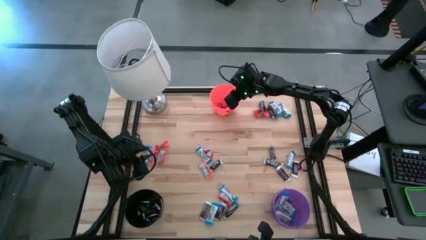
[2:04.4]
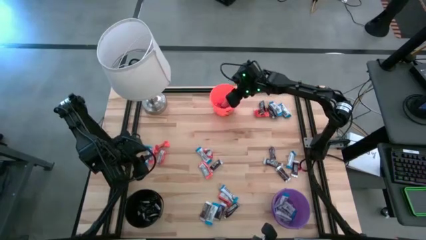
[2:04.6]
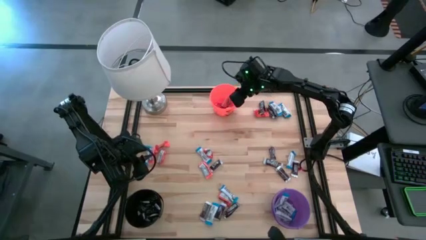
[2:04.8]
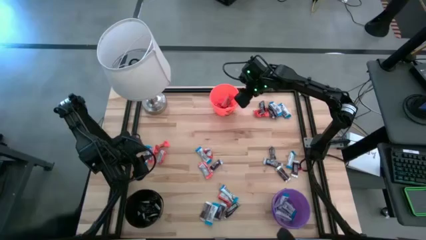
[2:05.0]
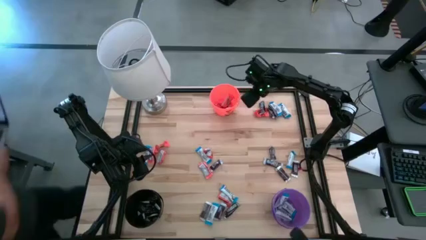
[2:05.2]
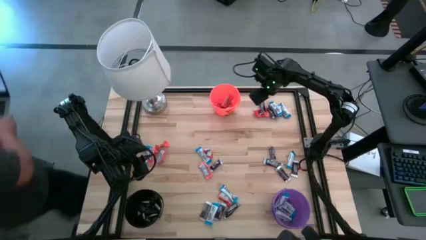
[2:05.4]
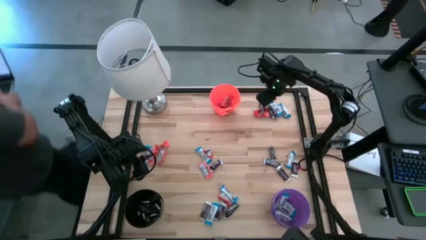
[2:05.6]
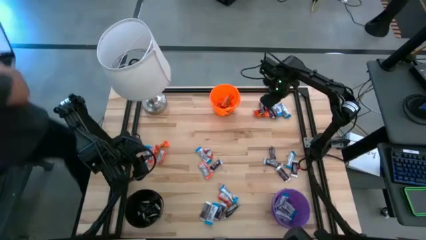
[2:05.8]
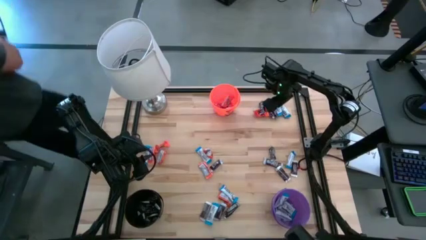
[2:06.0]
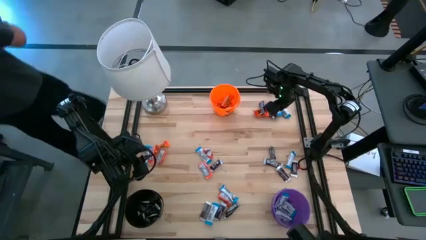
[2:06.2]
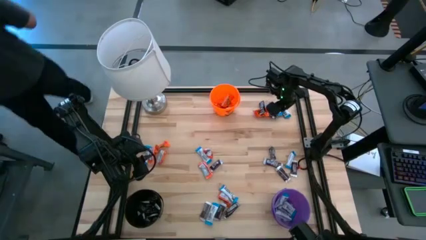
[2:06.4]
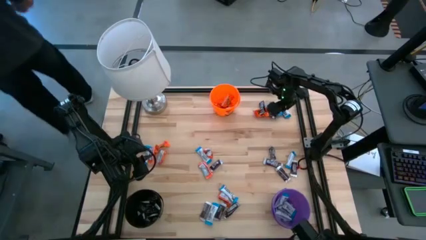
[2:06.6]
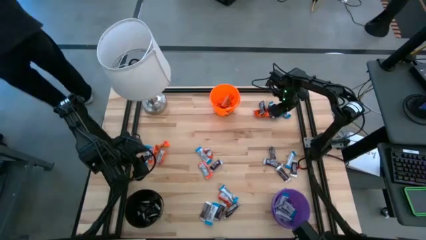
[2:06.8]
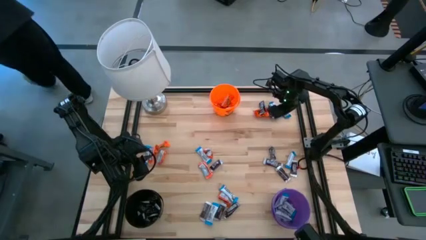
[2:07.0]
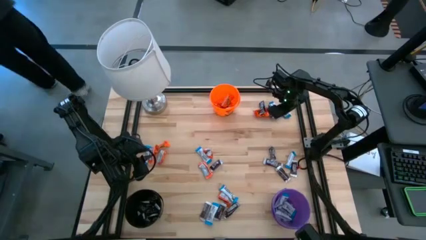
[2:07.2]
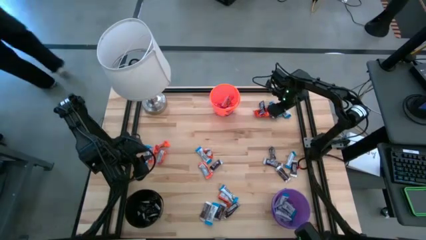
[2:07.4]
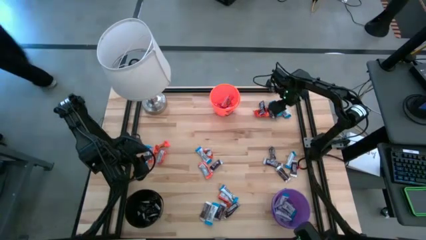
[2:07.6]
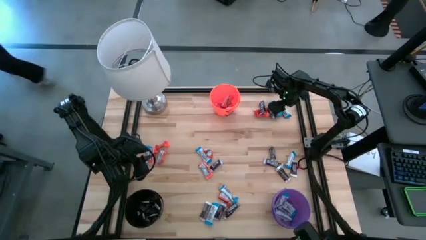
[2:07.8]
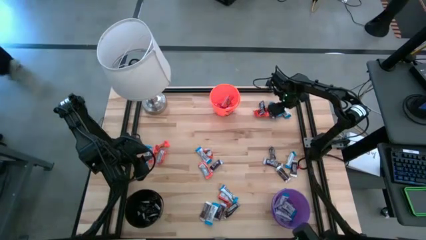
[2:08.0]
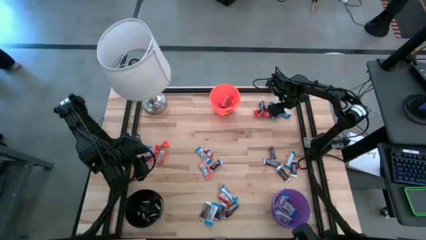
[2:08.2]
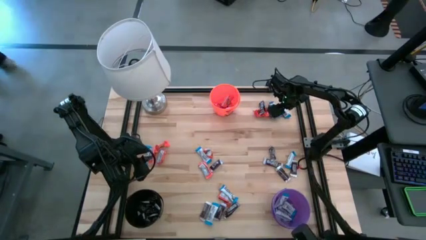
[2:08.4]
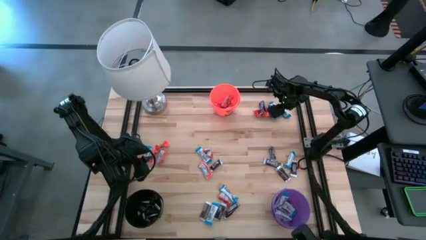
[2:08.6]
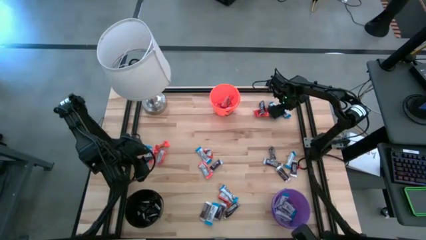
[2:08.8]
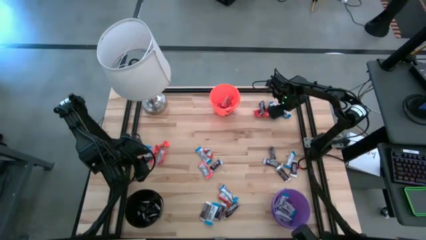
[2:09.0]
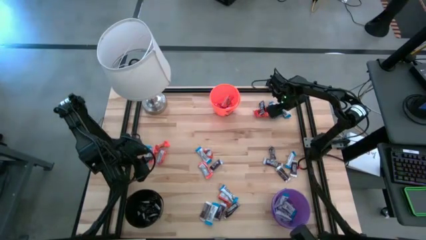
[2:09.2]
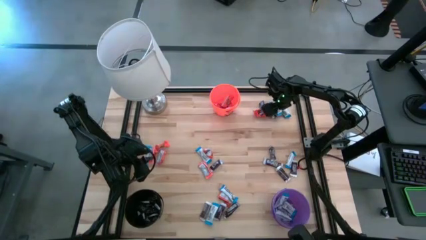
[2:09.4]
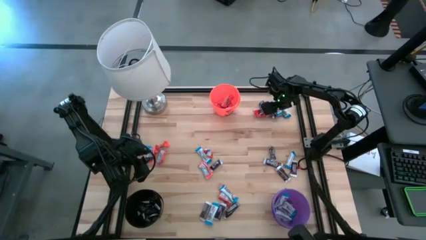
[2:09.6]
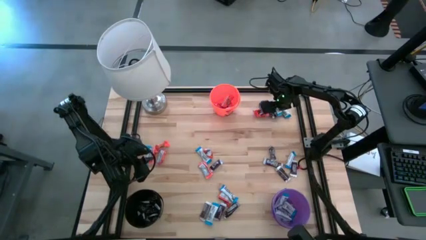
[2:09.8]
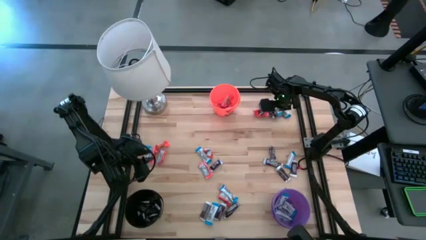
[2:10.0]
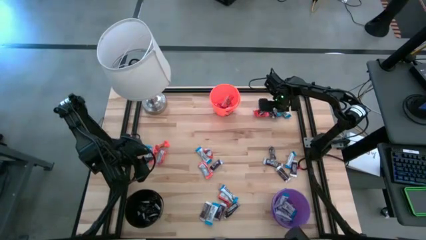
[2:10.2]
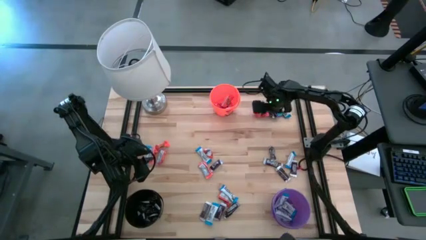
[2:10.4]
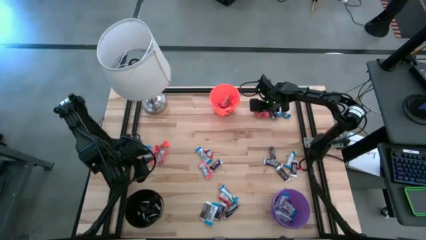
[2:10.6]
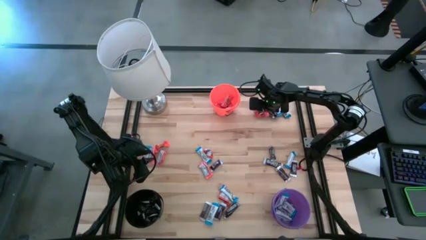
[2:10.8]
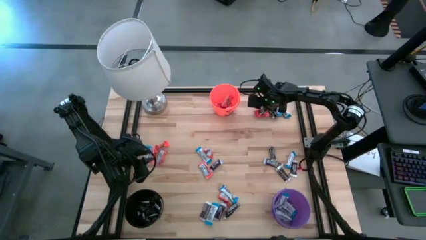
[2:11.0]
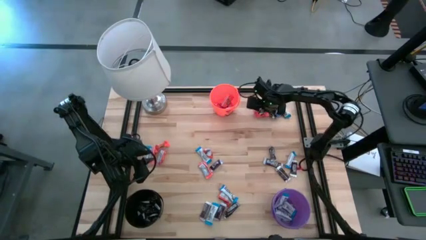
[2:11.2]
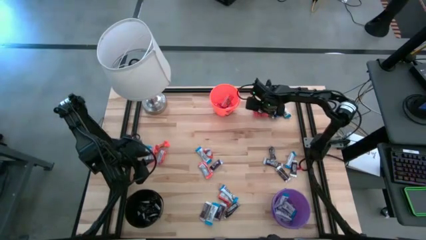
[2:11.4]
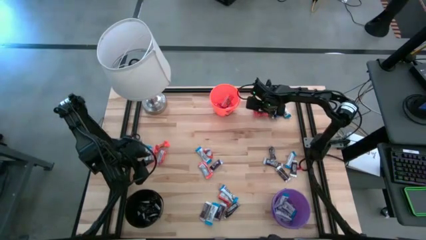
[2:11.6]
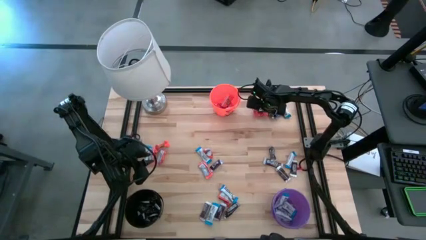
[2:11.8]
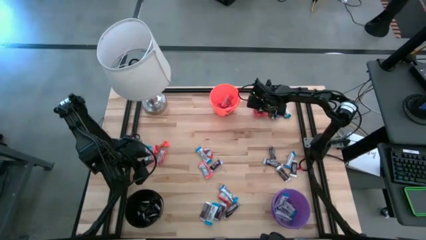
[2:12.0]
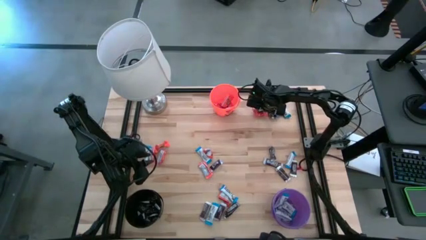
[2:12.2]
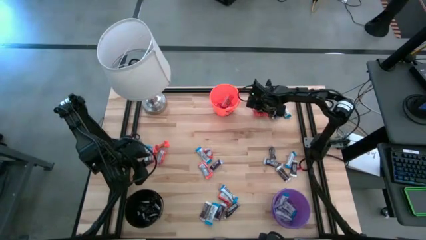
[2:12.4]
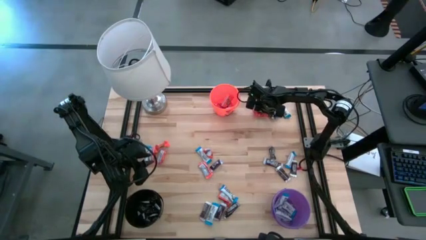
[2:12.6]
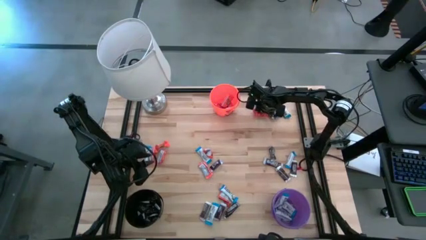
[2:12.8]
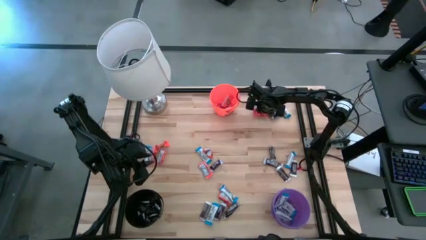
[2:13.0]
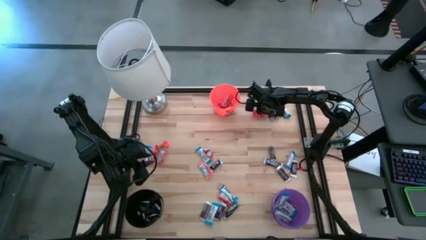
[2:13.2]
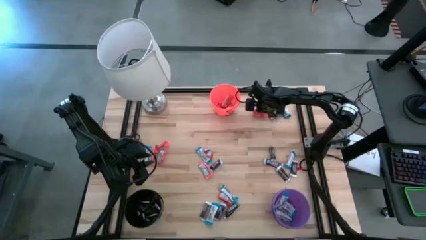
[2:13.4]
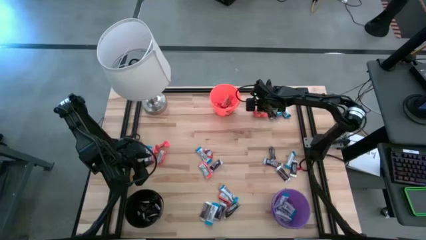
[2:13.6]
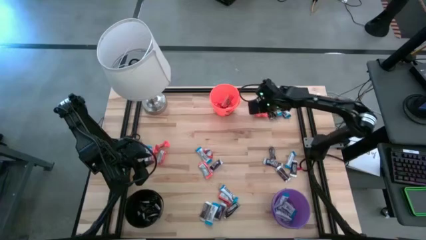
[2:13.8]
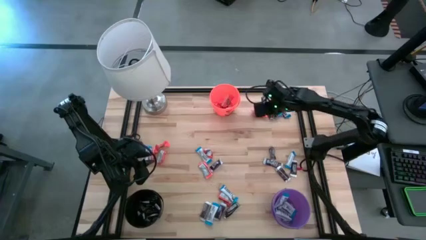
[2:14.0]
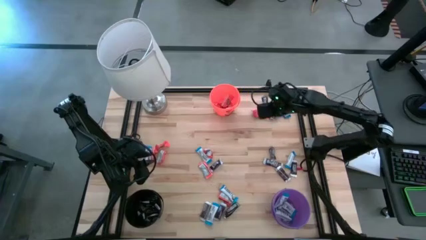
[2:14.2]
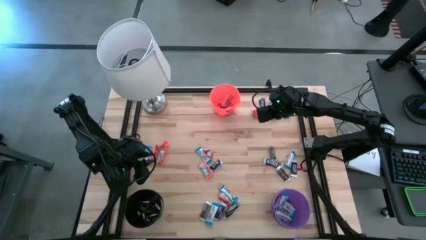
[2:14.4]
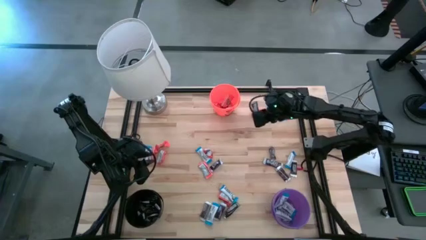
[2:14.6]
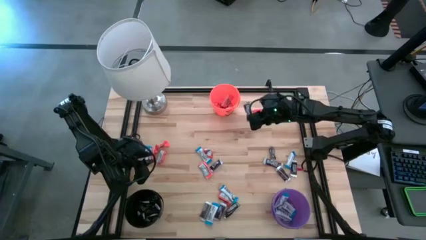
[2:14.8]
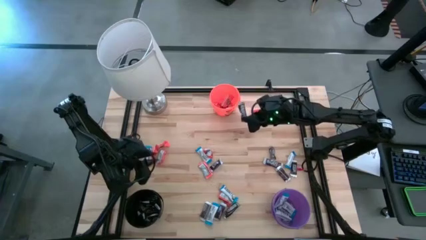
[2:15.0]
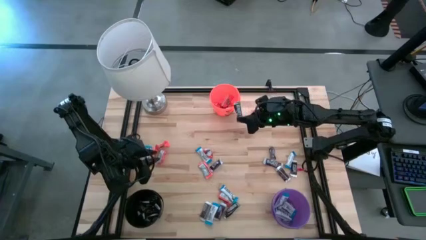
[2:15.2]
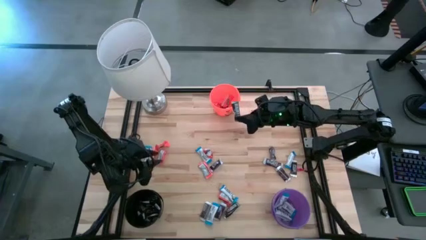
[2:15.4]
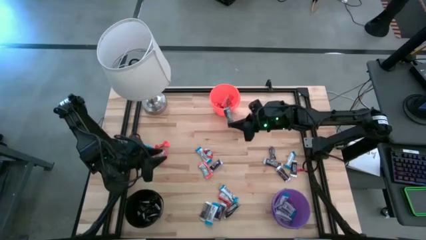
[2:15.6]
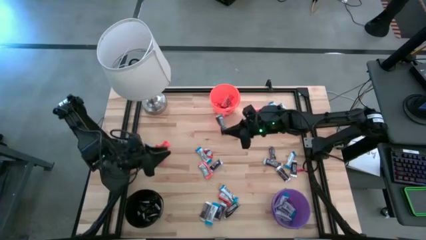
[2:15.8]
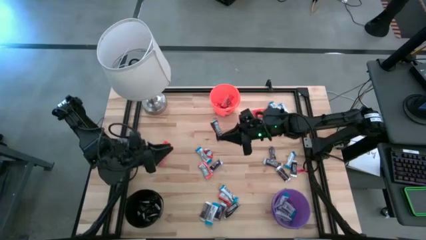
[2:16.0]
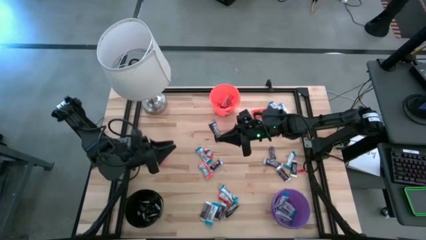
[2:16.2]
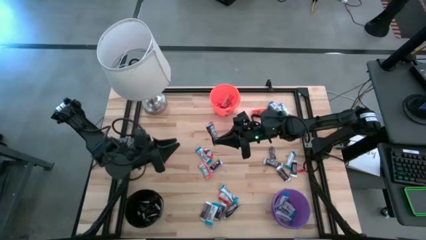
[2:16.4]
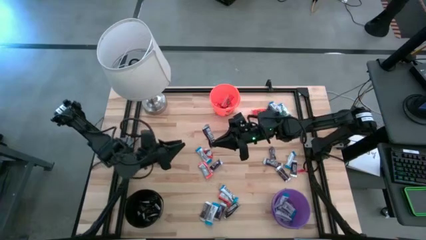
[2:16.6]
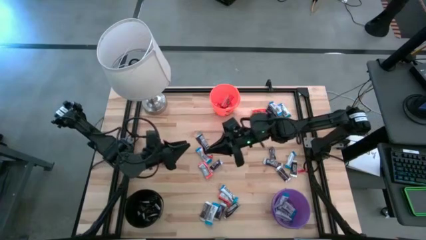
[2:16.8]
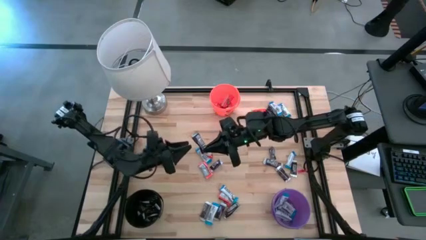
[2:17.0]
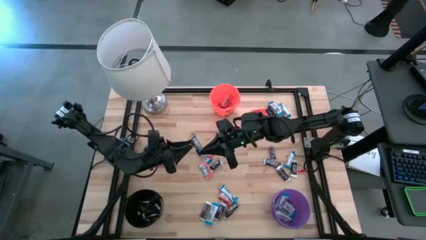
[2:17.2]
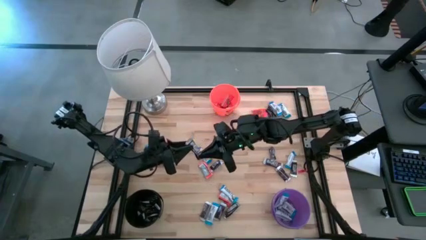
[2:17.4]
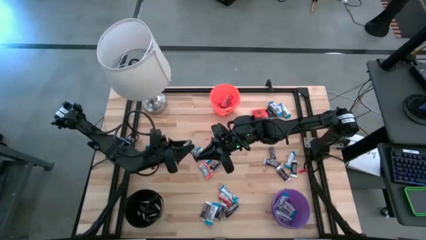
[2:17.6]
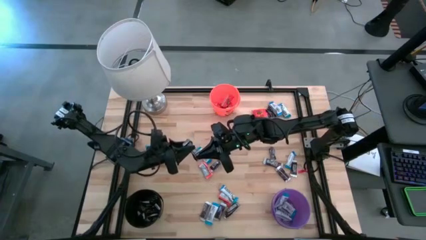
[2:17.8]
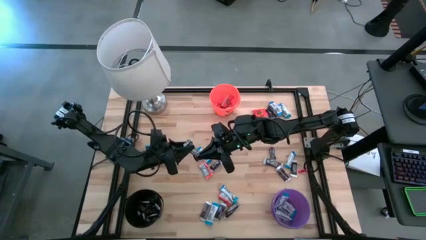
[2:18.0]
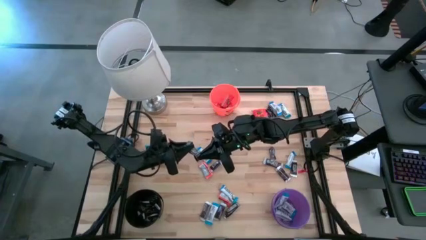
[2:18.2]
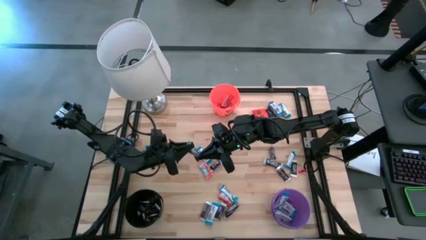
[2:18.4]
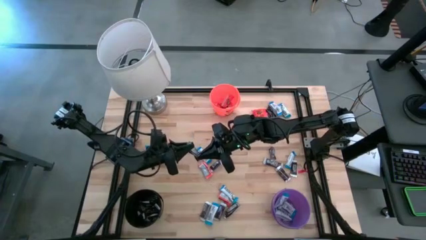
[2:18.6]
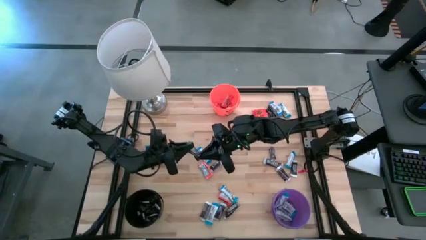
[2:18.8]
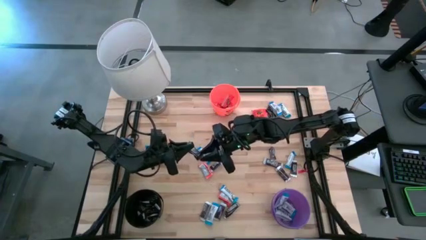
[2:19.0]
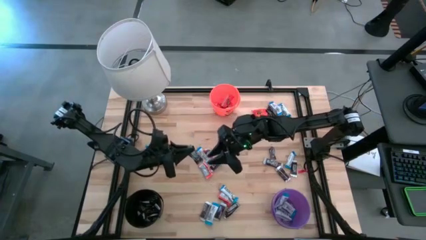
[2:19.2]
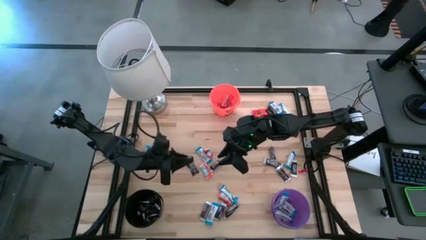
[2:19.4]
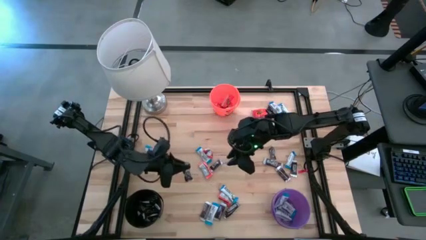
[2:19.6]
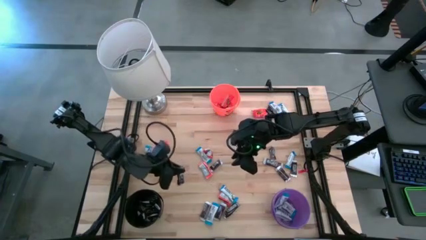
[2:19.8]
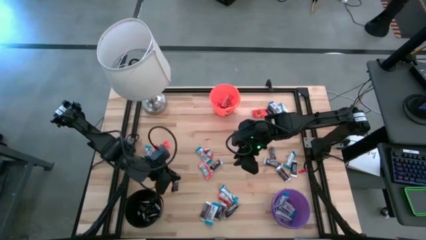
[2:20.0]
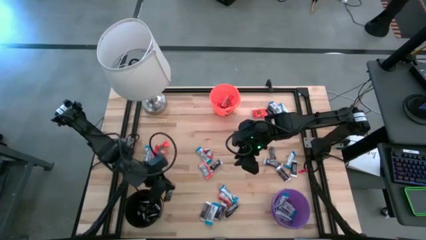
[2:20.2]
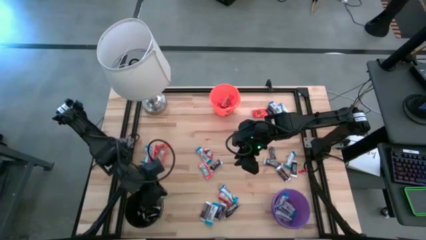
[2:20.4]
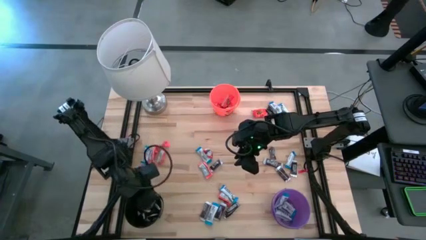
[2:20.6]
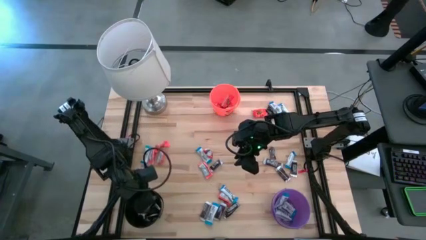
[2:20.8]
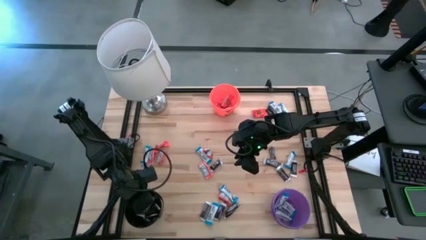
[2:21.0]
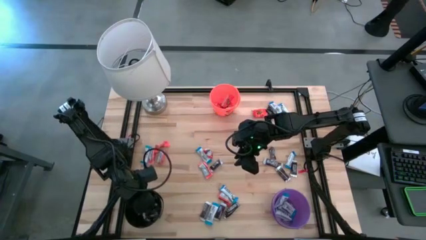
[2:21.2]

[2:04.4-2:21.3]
Task: Organize candy in baskets
Put the brown chocolate into the black bucket
